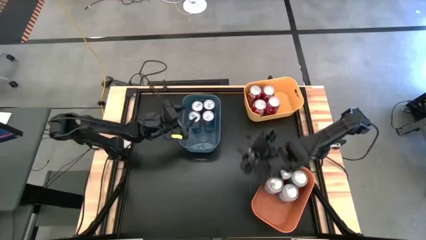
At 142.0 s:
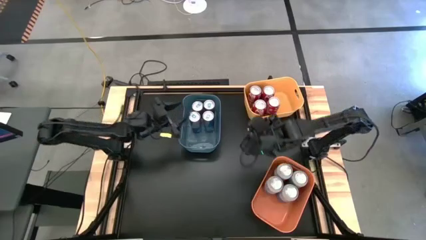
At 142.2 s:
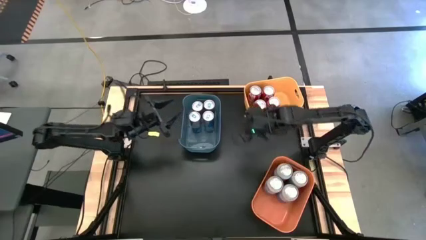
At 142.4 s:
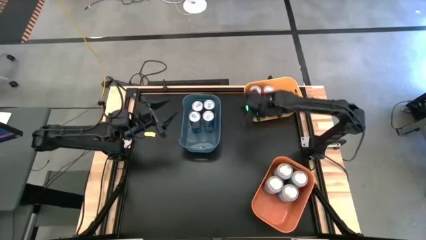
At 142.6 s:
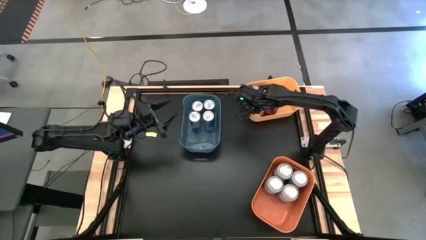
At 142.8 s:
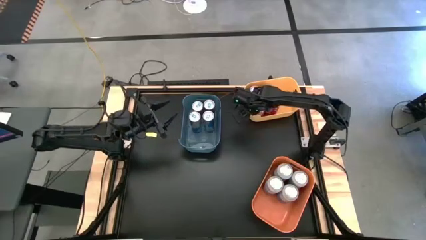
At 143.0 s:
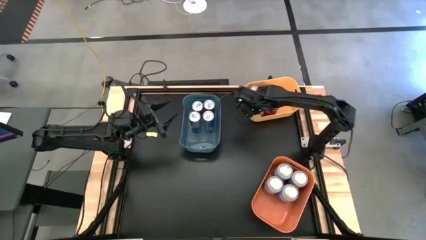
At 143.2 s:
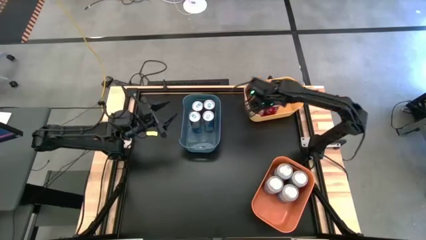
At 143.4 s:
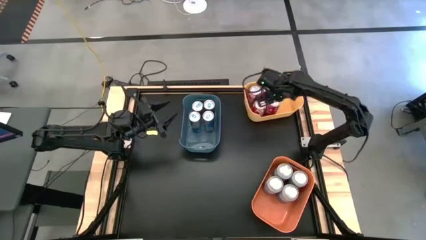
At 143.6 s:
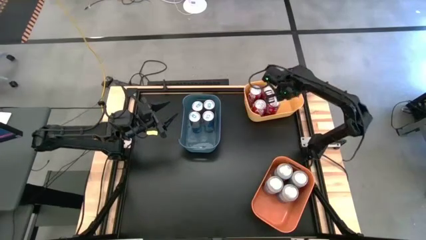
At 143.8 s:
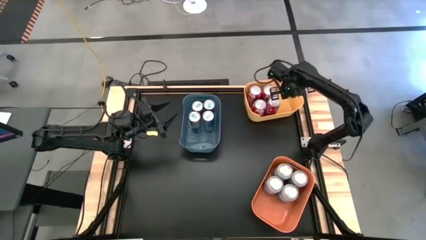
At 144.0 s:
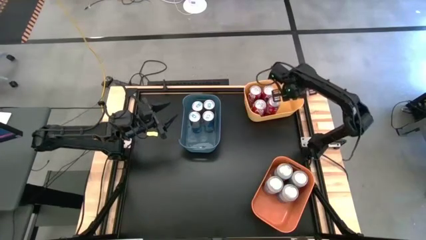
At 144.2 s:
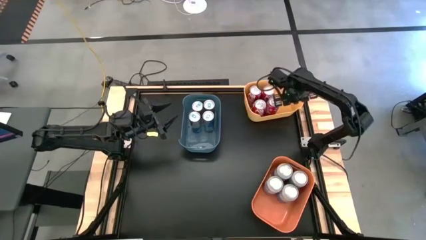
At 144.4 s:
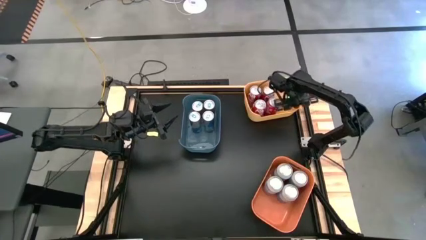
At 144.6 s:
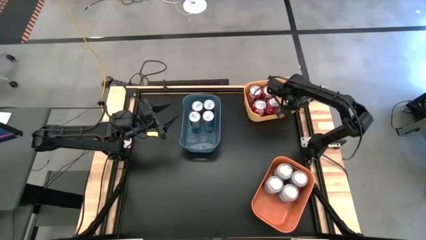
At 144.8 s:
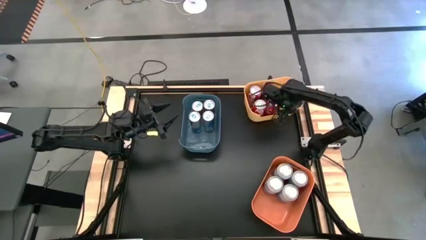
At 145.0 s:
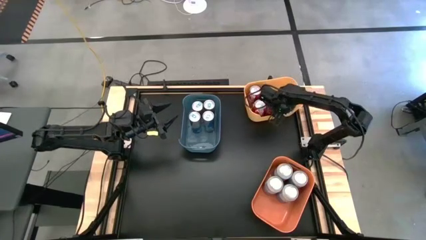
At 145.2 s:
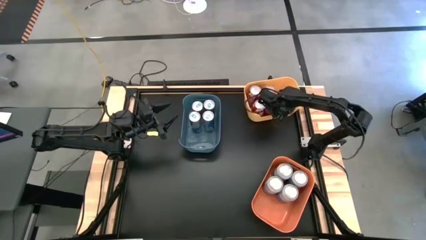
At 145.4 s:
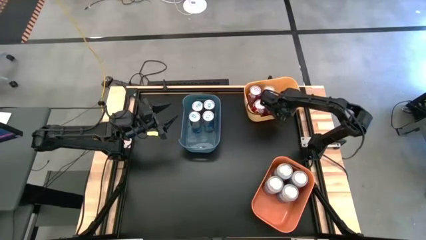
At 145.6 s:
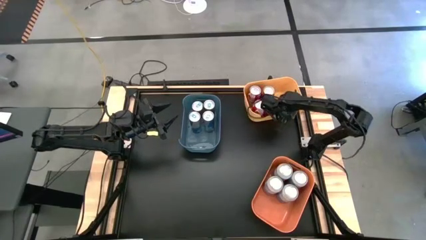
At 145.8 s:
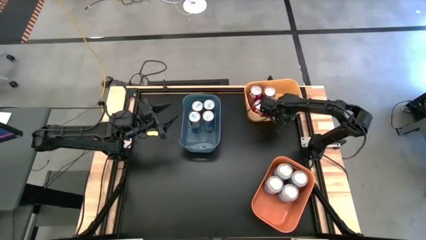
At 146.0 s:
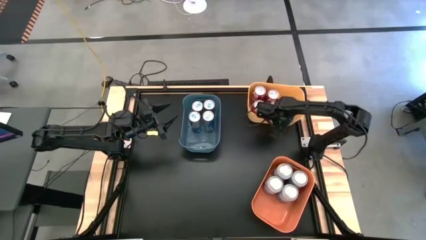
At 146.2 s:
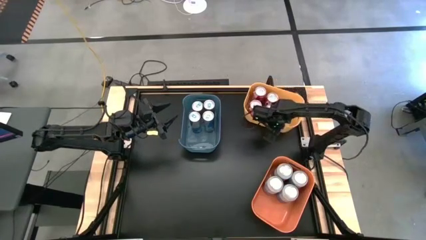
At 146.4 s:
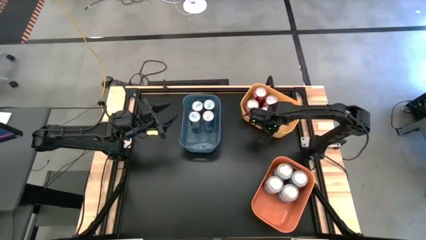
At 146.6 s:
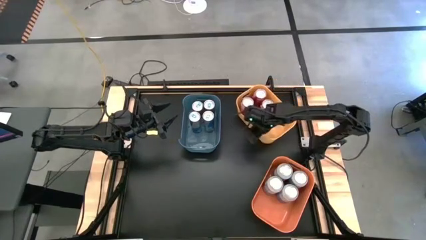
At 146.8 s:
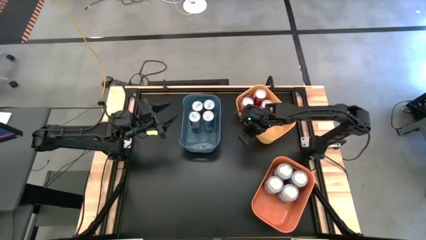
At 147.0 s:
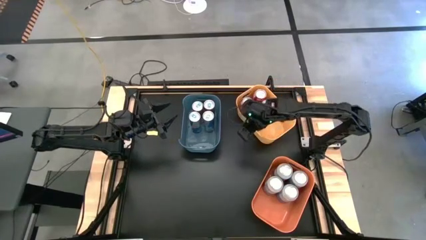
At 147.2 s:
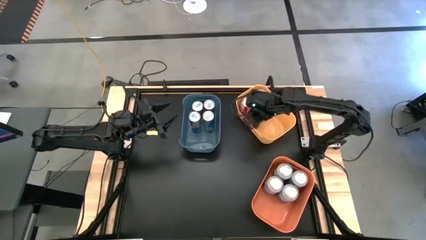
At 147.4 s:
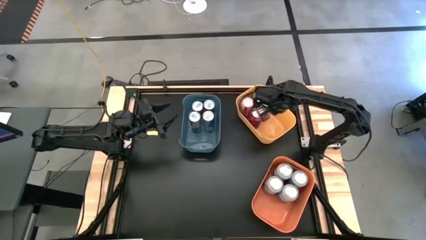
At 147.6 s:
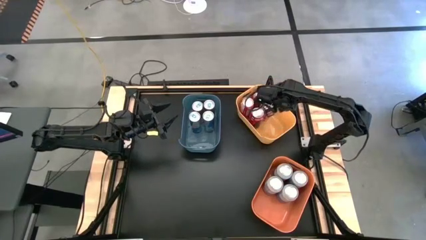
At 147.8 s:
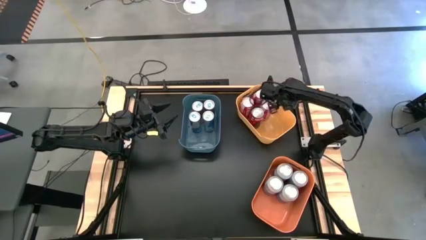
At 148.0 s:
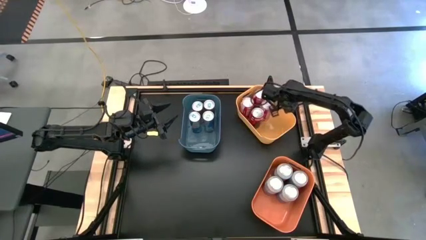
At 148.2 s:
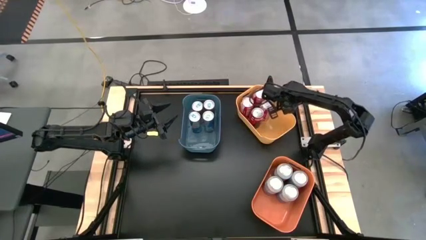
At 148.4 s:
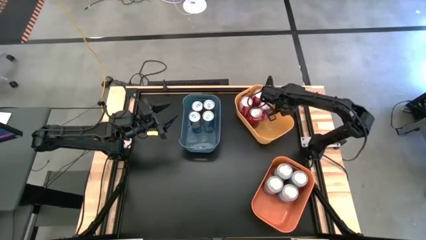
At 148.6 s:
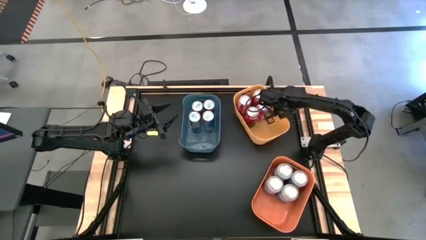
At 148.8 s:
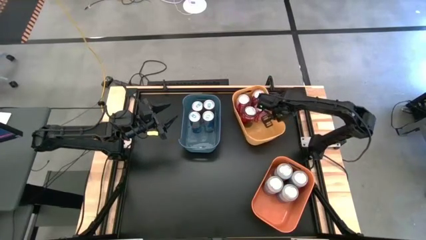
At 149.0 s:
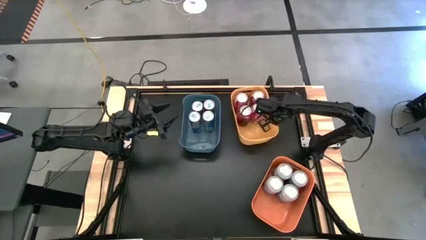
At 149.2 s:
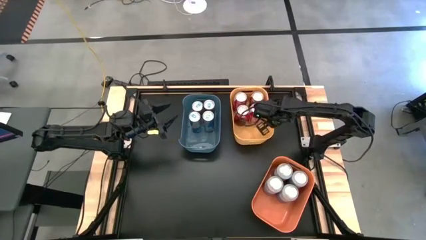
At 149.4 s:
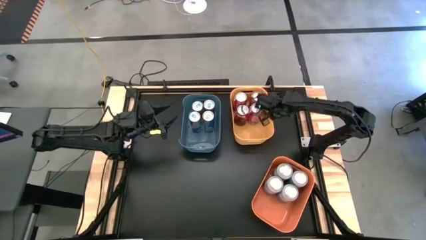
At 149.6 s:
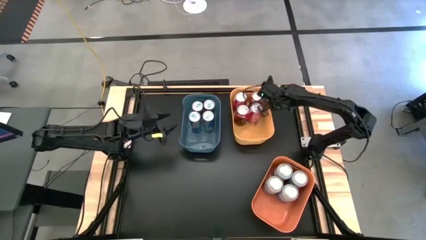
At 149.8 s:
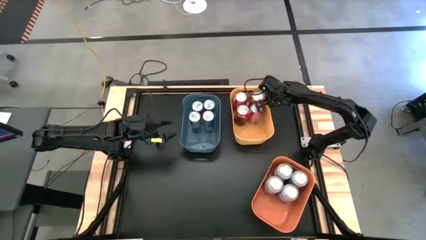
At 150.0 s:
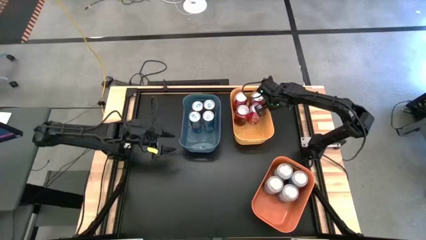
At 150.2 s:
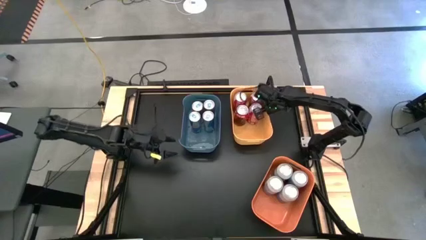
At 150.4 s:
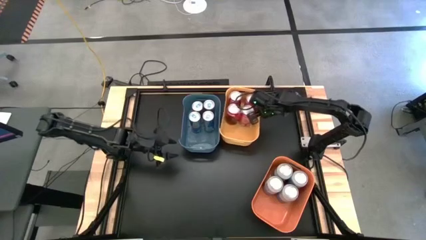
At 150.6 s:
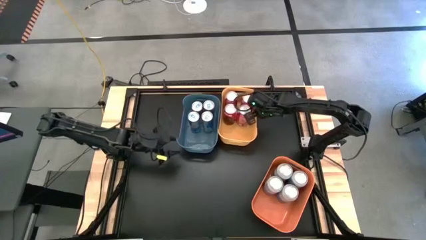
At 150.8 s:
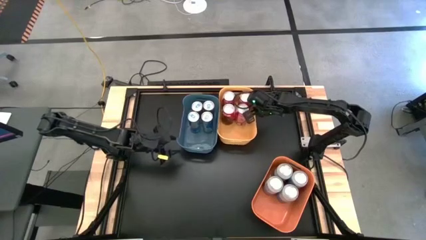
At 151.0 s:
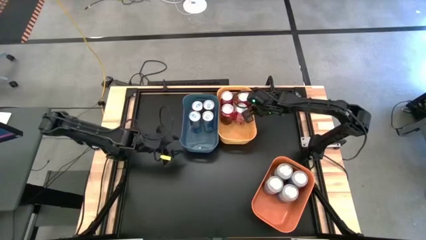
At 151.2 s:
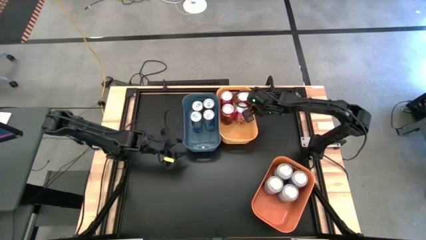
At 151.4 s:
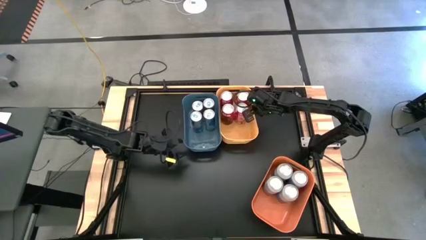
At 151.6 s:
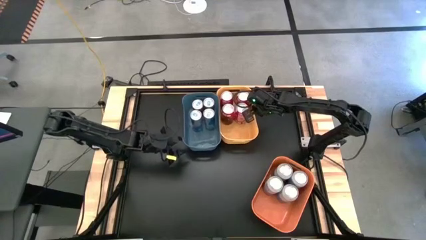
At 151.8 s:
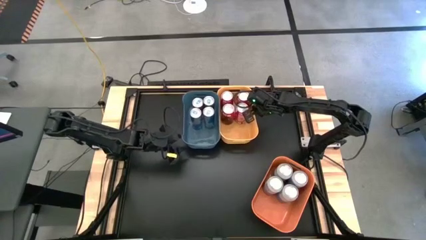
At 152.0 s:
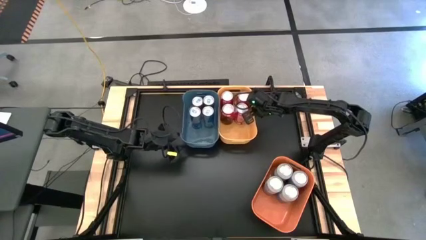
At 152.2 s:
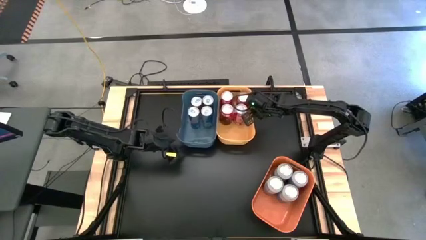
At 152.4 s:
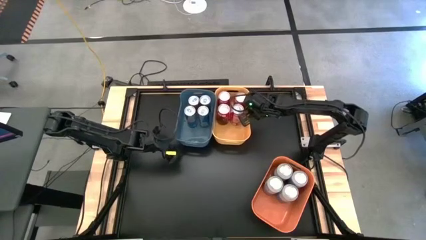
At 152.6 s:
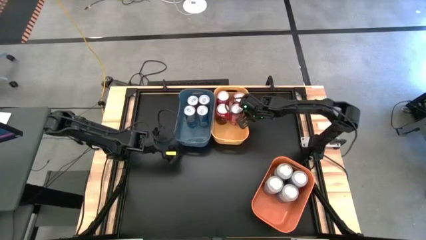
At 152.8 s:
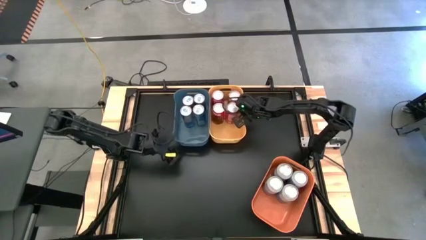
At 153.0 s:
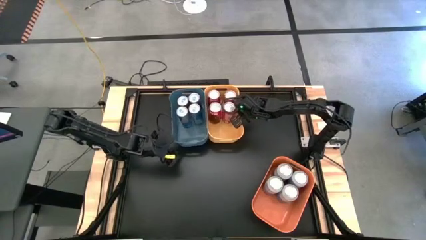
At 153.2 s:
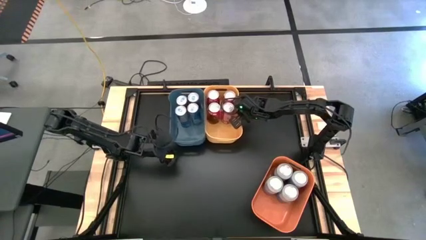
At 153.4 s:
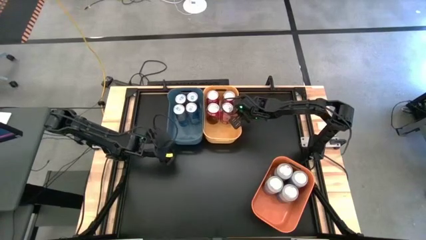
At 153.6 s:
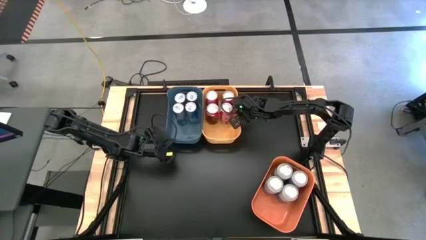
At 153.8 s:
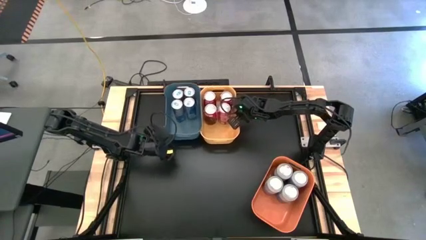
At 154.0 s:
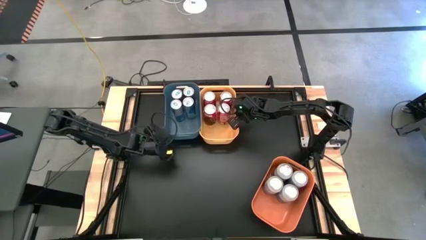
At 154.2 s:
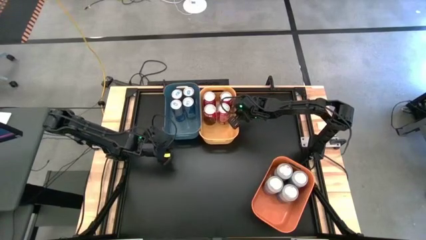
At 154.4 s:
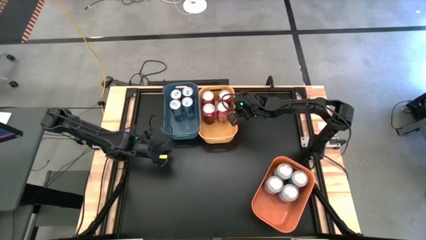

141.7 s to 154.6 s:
Task: Sort soda cans
Adjust the bins

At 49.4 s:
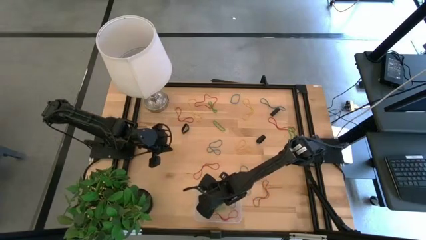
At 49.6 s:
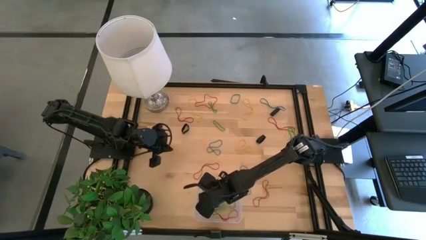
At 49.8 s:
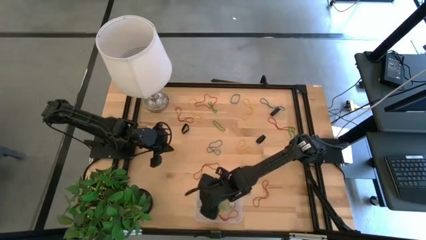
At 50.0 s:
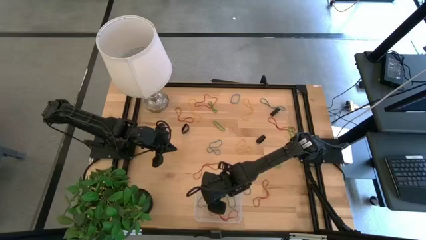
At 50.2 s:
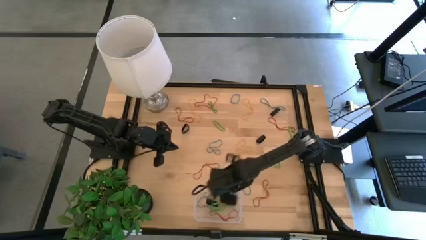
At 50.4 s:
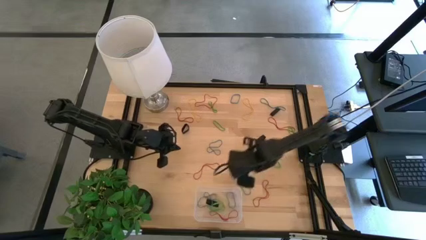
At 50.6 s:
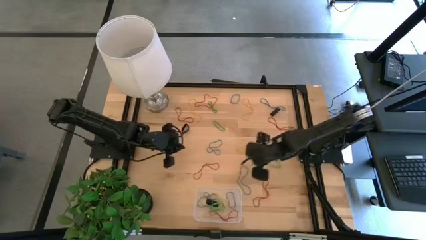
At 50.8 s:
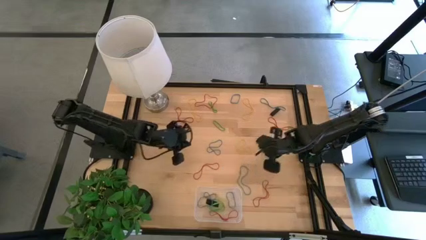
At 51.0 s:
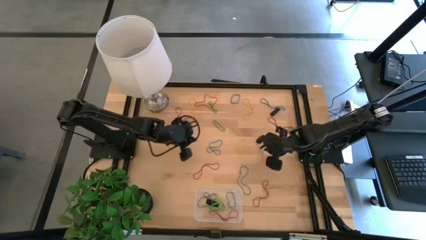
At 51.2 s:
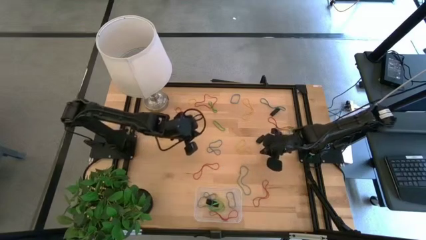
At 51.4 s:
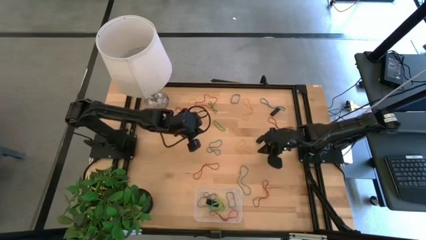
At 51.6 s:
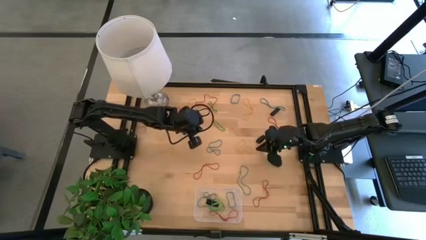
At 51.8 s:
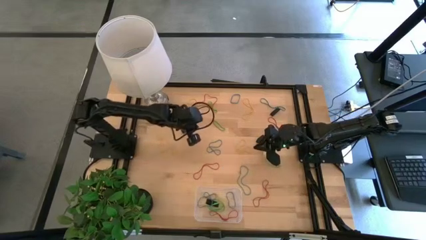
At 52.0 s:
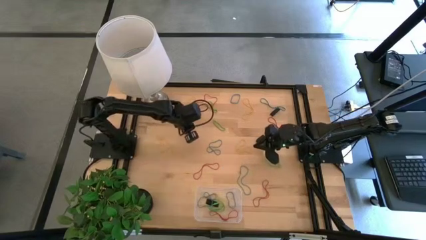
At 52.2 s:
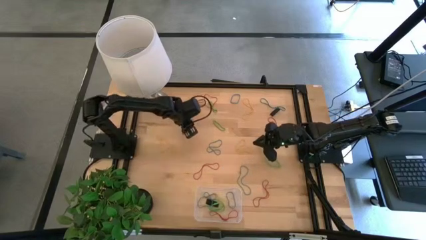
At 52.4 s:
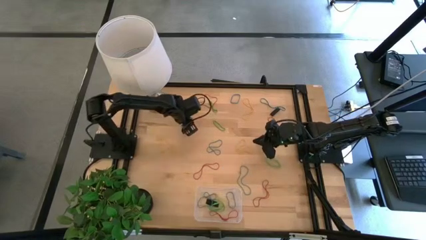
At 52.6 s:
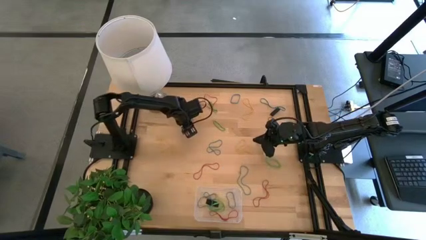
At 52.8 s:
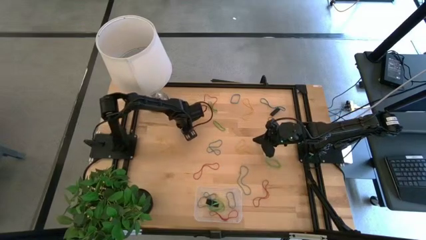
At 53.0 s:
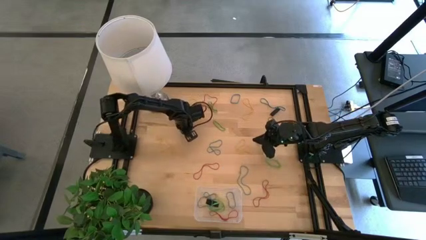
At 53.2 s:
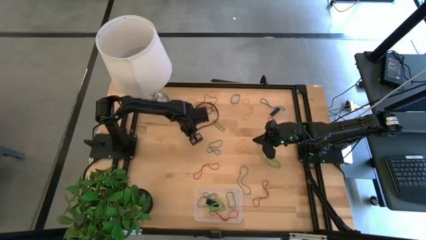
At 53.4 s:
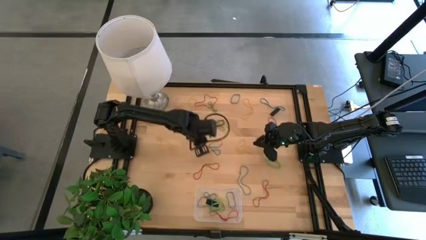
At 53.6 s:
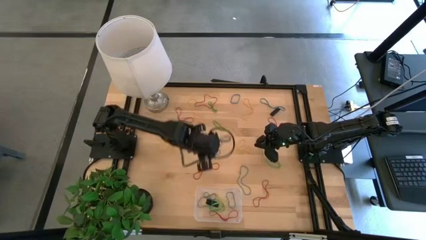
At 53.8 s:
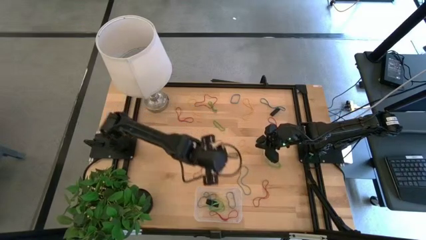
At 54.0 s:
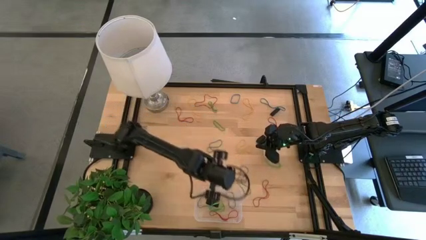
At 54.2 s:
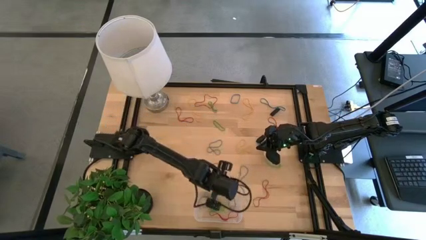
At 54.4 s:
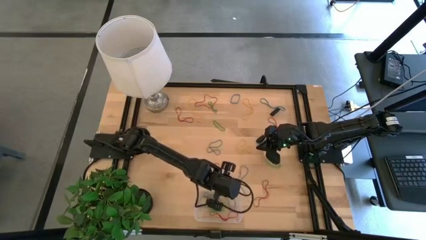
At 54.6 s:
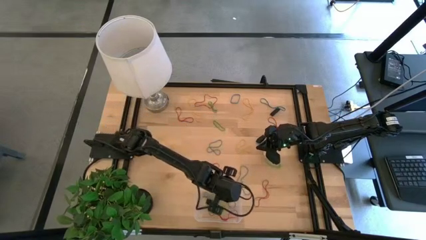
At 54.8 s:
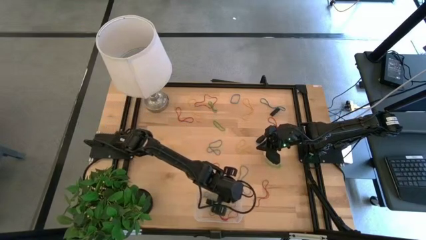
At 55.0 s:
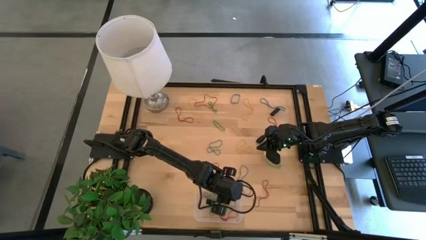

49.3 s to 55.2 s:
Task: Pick and place rubber bands into bin
Put the black rubber band into the transparent bin
